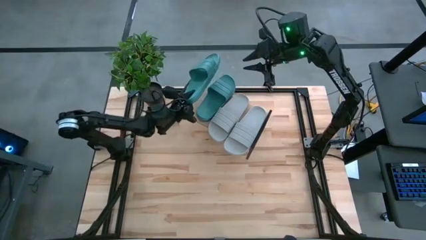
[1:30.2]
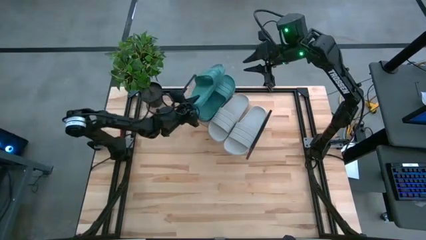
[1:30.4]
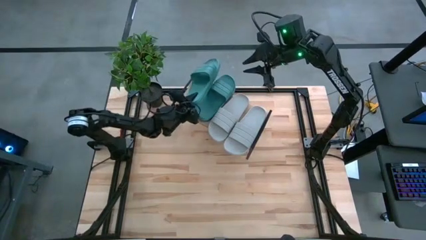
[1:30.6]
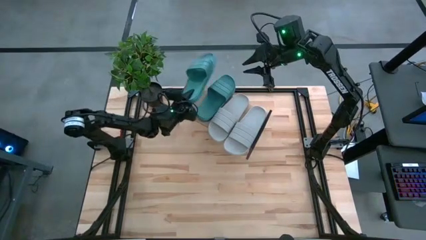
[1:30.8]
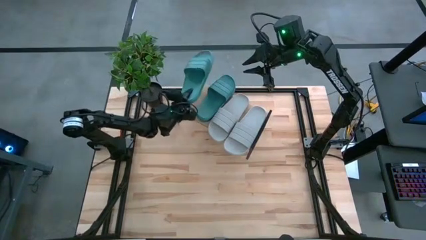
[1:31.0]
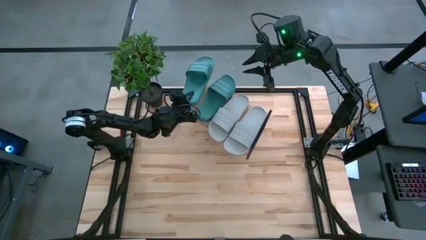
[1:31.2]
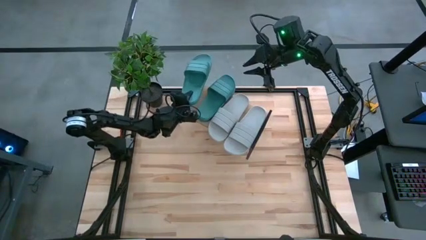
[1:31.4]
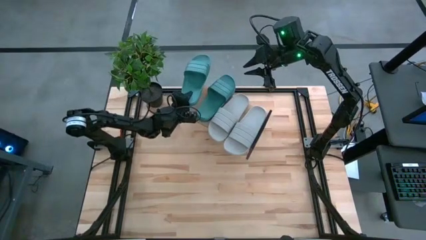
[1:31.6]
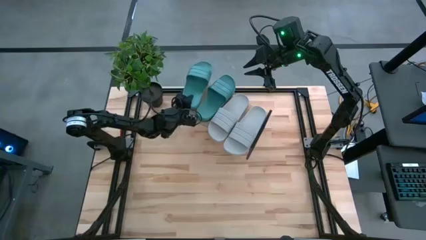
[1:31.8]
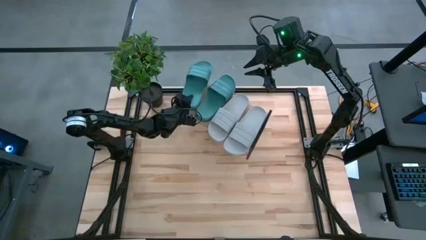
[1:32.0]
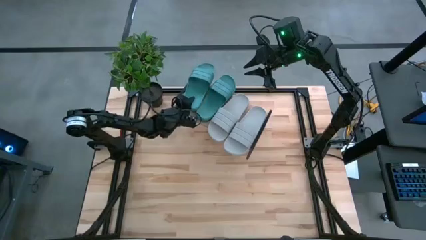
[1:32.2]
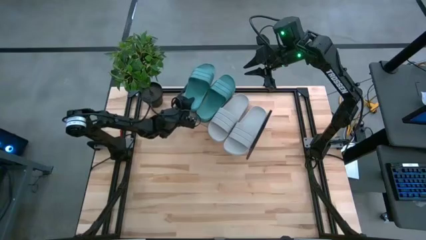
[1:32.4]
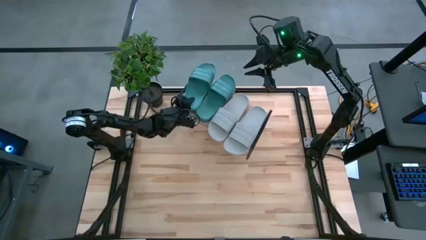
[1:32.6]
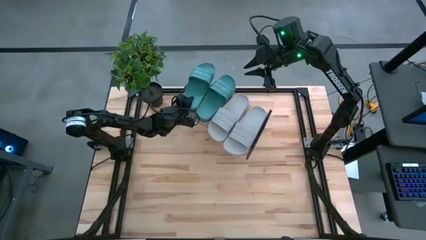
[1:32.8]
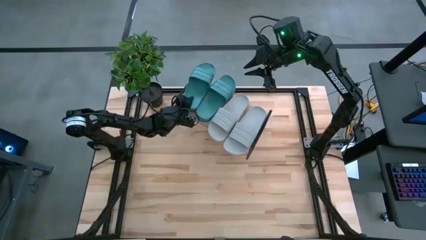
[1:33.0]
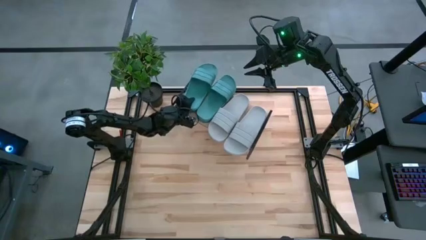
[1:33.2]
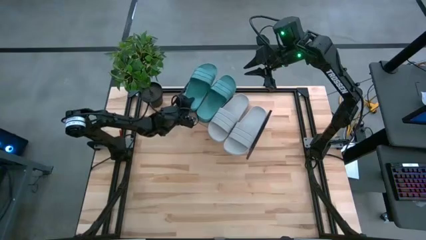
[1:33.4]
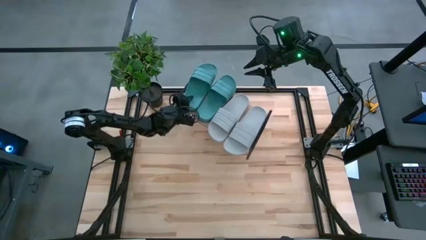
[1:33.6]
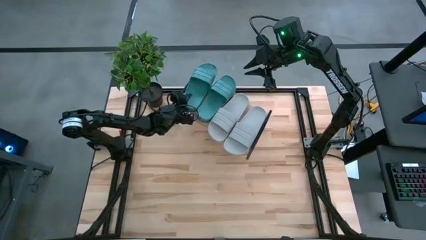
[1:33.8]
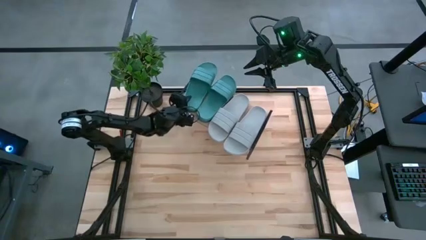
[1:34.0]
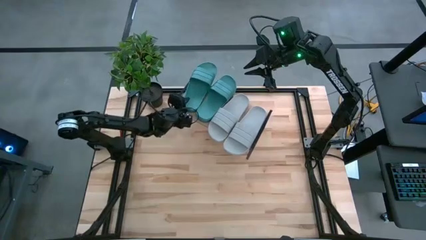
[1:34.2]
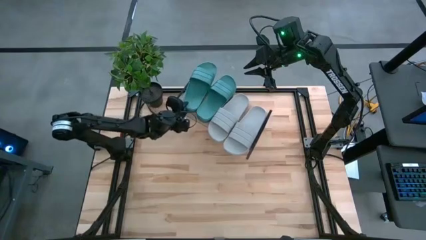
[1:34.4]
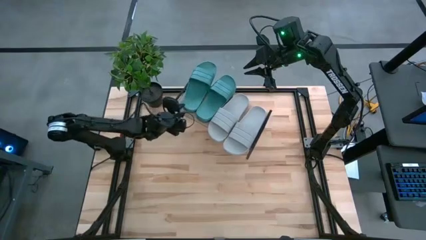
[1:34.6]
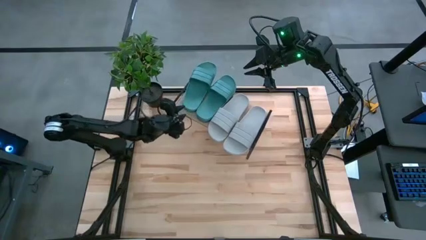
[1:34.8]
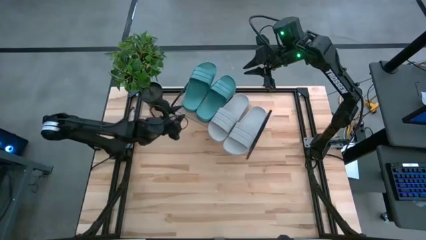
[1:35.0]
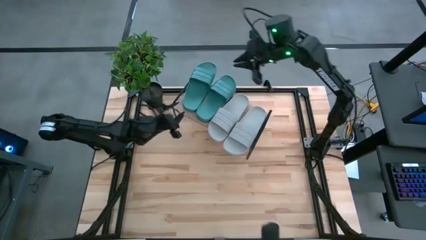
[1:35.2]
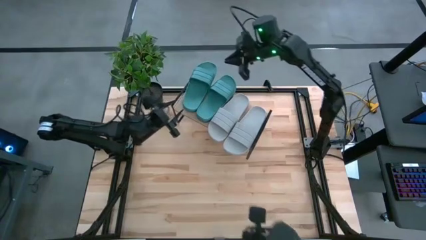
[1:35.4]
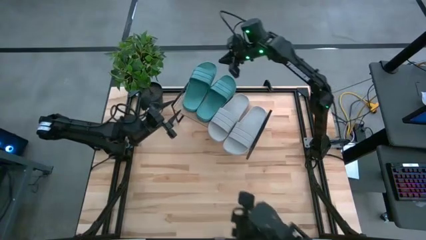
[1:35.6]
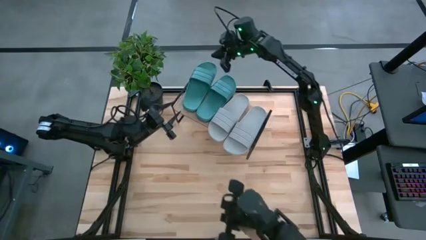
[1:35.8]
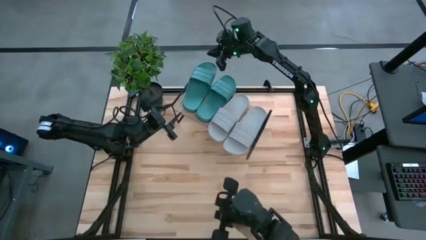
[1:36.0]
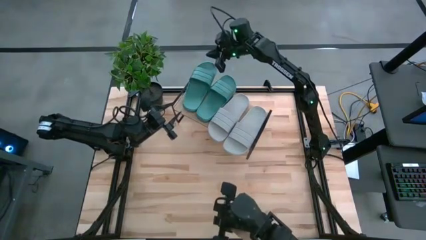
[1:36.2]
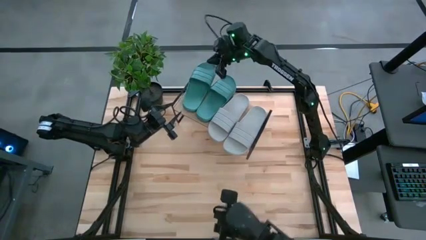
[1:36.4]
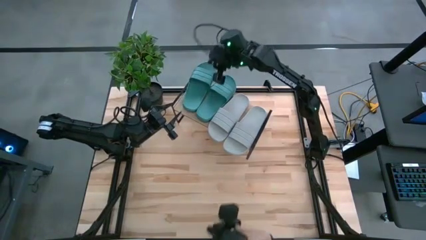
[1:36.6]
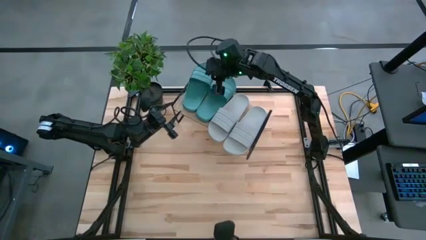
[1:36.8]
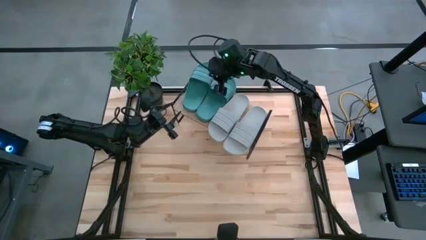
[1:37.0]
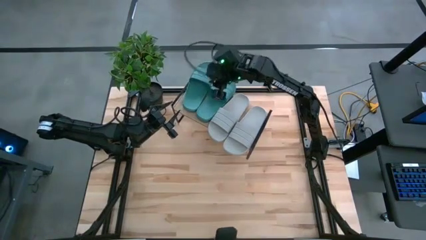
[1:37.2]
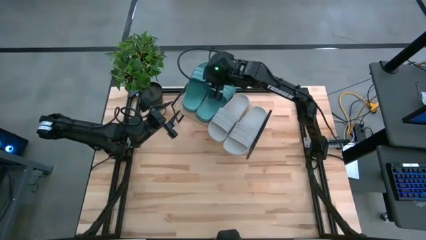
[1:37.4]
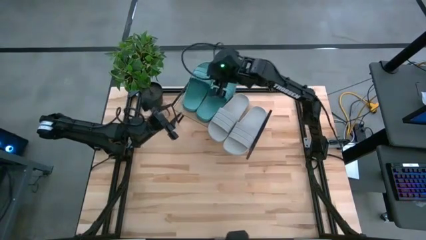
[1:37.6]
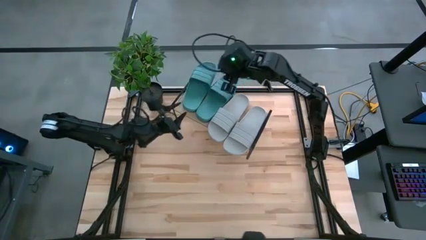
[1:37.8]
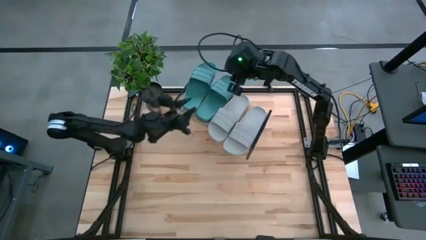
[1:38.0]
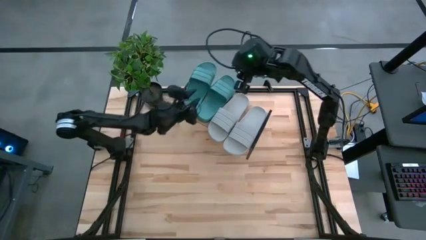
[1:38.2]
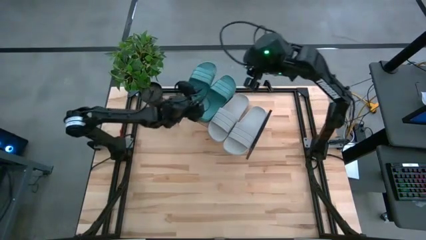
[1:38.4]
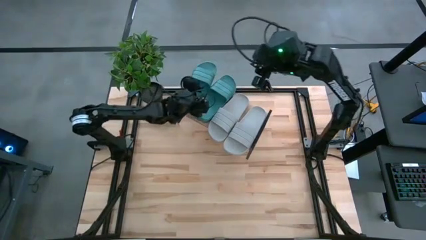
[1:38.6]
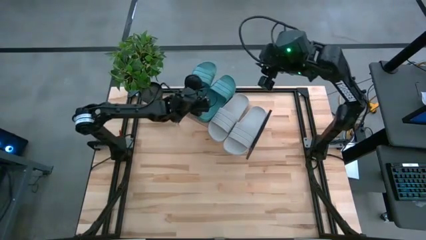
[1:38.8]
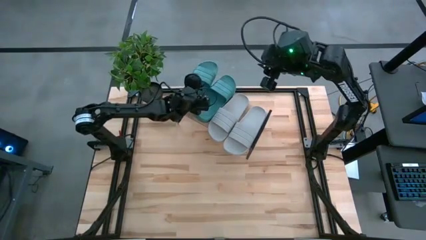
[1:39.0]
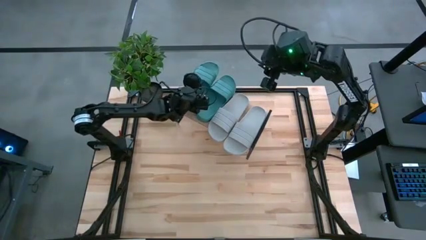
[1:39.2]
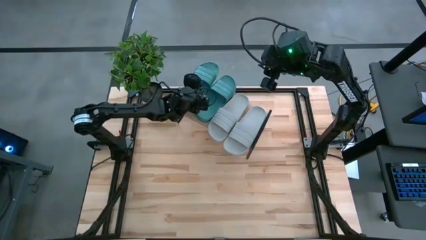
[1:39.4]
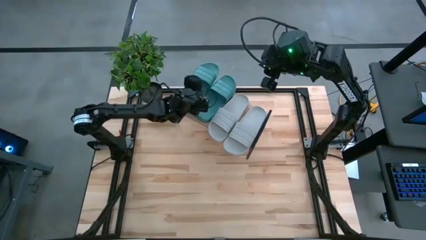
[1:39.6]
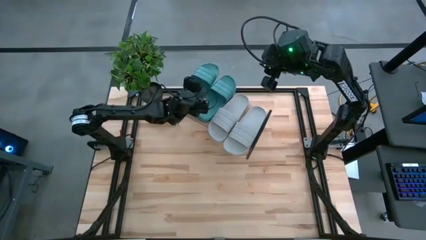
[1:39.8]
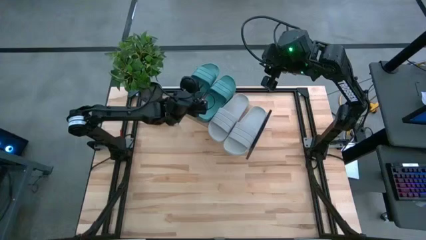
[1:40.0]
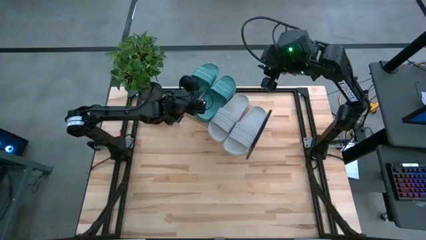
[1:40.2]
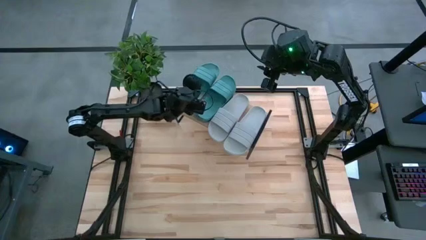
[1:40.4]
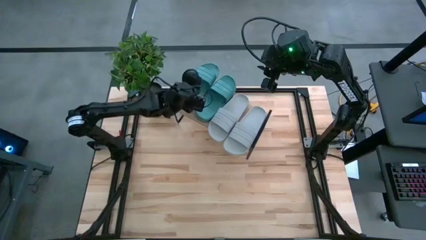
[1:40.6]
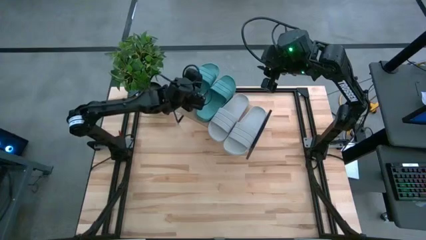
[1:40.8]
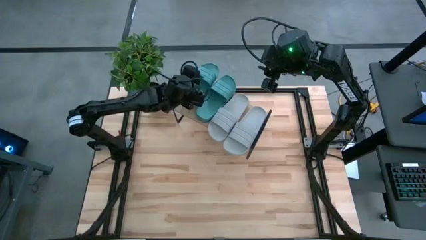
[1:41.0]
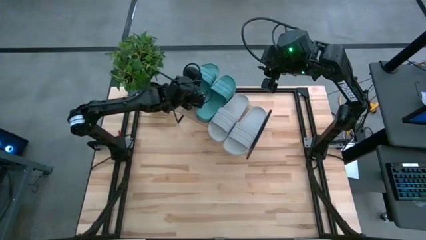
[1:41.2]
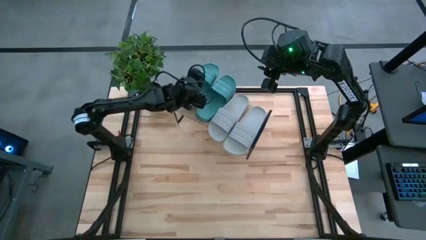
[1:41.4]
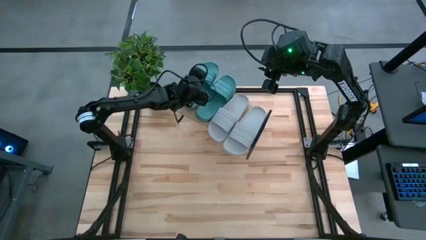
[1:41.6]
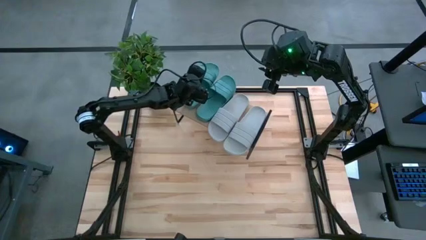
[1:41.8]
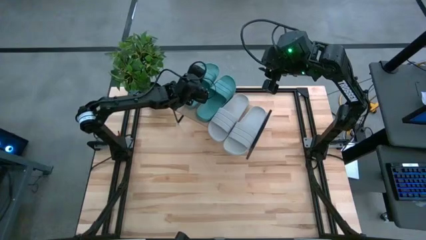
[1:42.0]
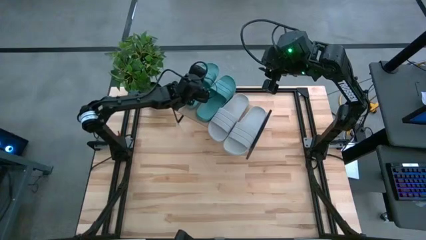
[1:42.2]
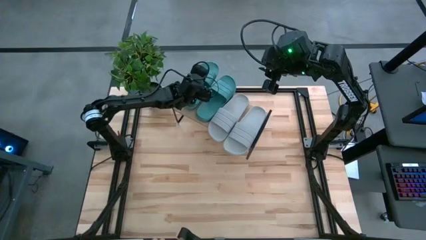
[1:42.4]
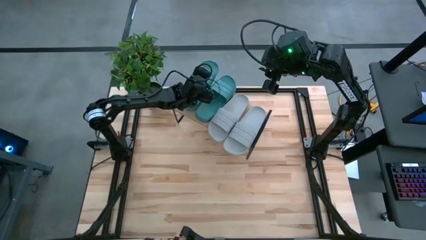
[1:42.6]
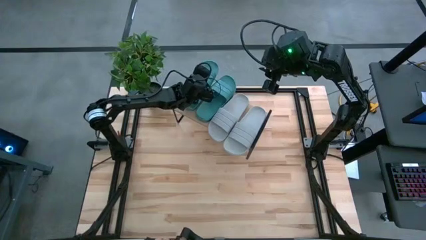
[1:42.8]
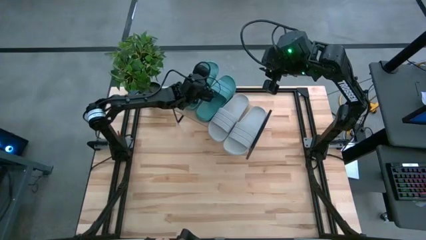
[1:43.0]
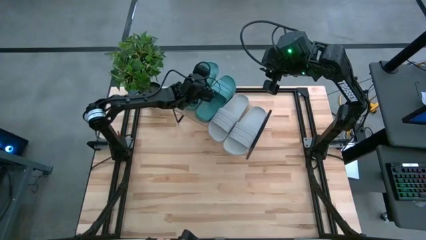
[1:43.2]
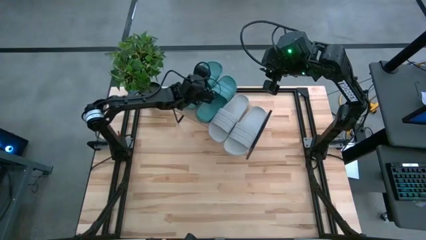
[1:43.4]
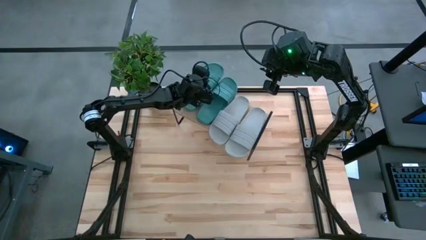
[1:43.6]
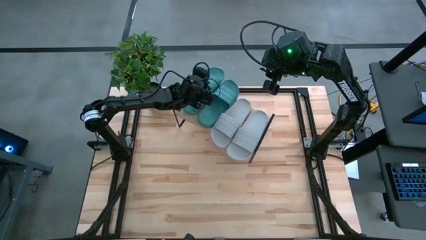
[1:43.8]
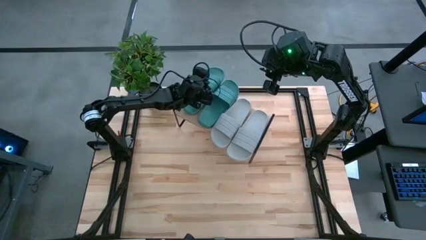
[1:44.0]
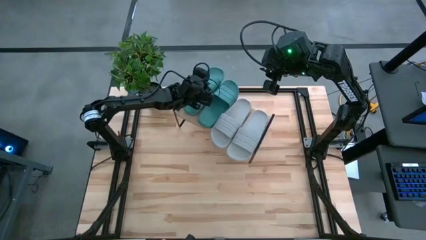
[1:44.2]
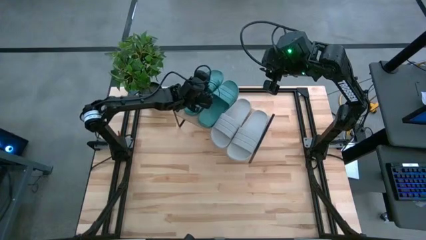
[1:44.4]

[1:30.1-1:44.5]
Task: Pick and place slides into the shelf
Put the green slide on the shelf

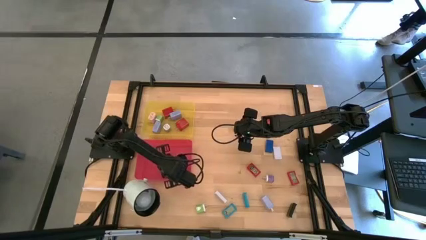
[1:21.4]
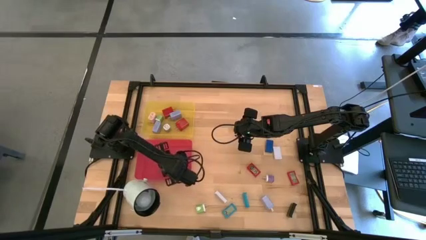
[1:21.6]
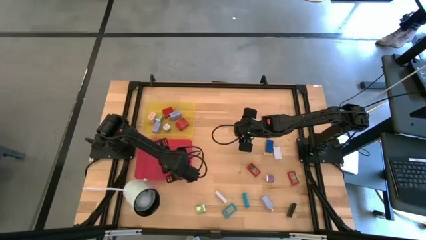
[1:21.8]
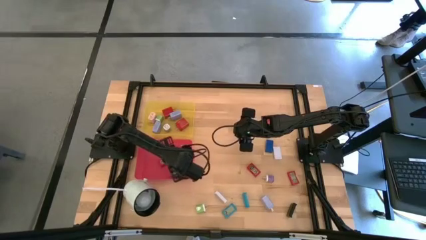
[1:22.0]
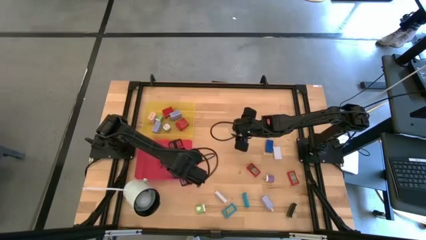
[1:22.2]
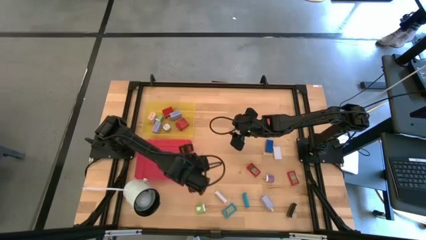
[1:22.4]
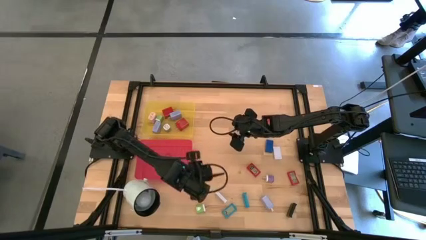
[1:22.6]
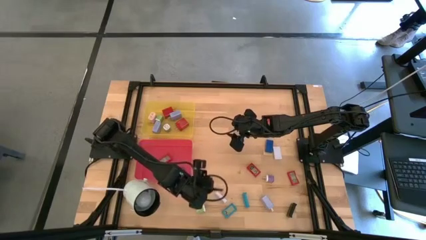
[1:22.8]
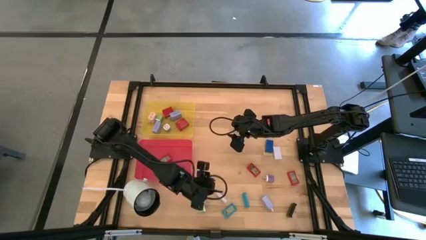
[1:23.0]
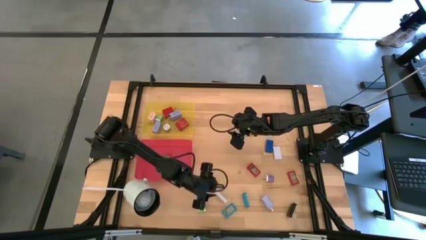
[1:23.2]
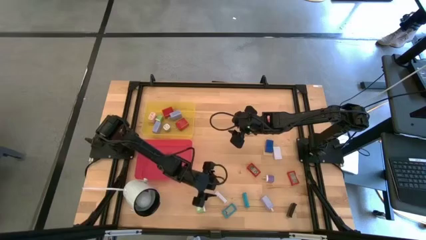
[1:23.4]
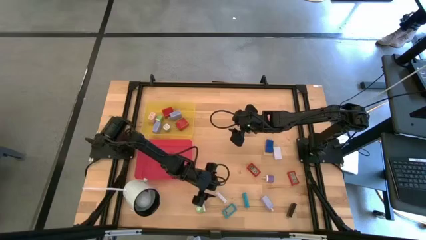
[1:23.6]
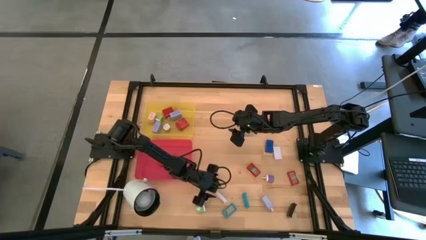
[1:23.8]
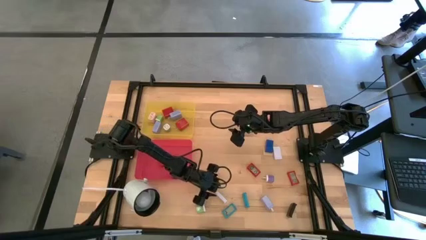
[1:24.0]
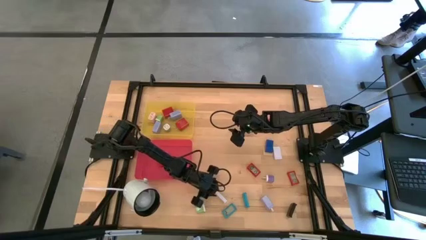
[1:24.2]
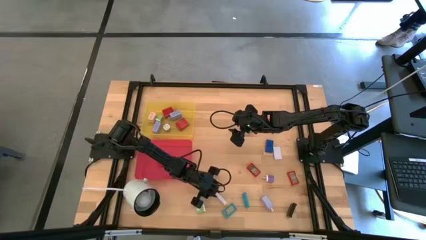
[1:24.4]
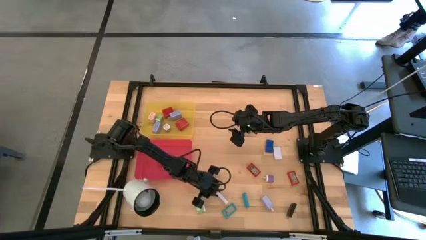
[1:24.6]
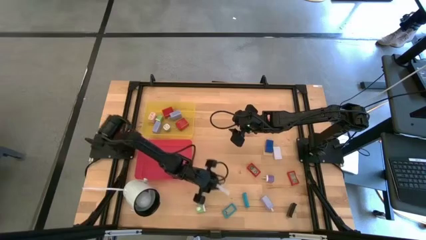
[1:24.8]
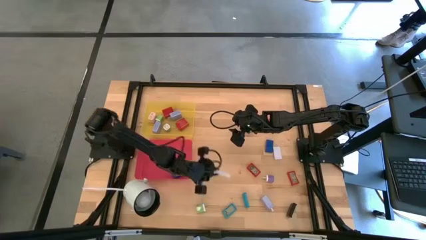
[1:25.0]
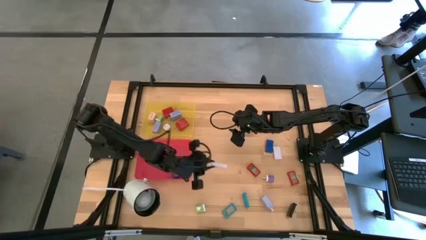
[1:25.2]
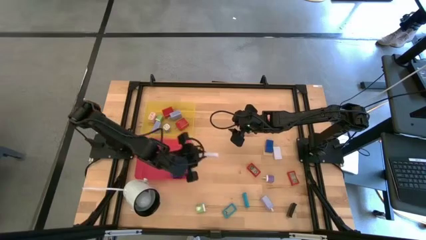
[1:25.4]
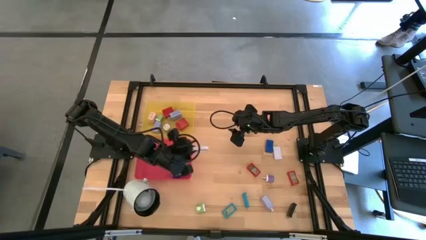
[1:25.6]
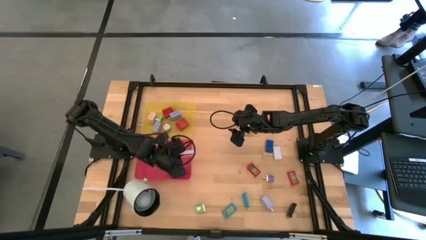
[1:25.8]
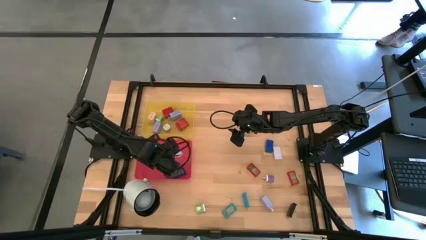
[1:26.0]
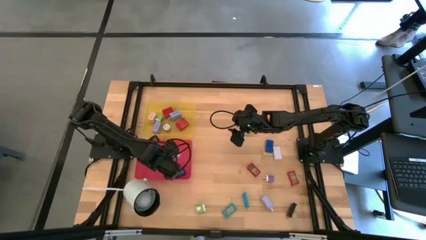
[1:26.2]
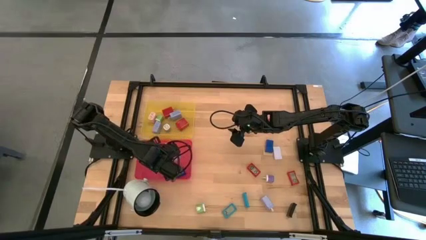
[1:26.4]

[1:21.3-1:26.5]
Task: Pick & Place Office items
Put the white timer into the red bin
